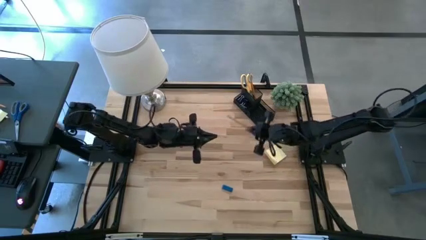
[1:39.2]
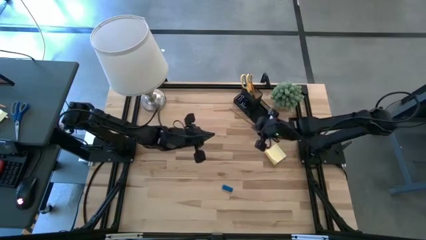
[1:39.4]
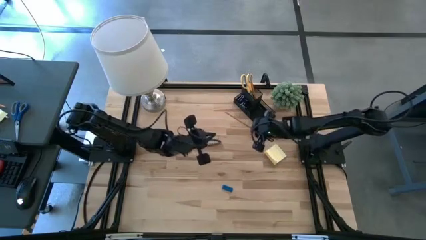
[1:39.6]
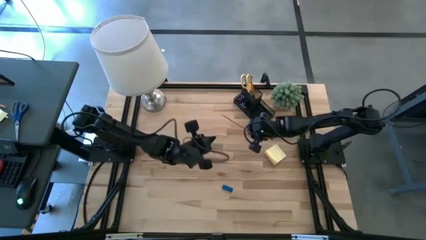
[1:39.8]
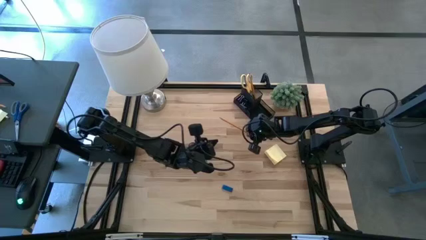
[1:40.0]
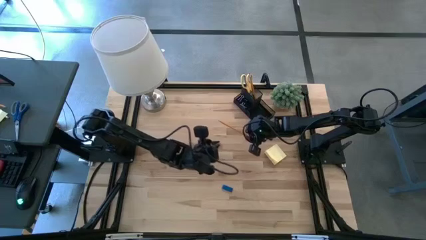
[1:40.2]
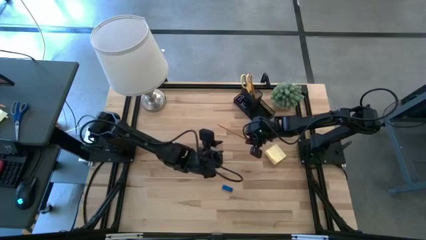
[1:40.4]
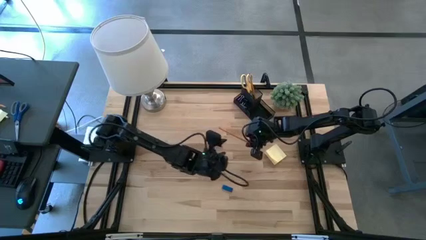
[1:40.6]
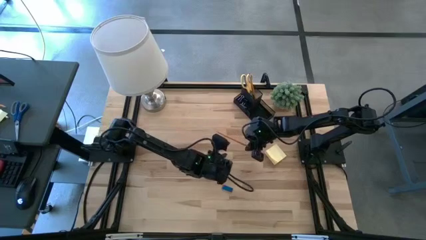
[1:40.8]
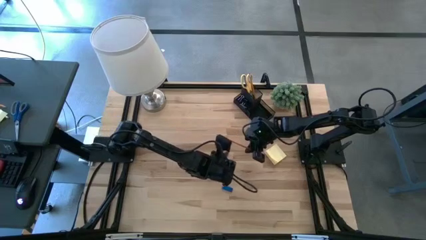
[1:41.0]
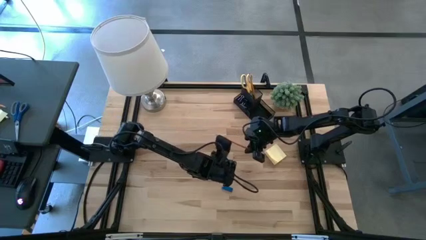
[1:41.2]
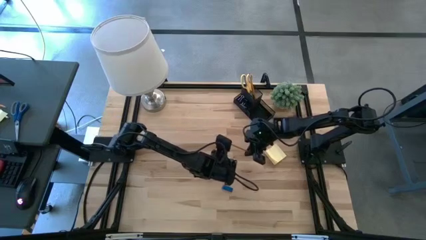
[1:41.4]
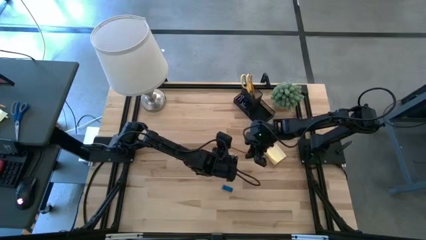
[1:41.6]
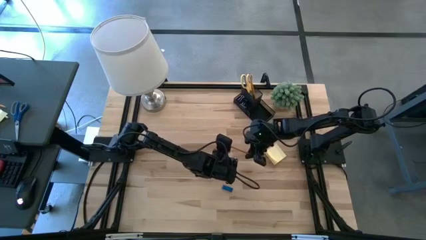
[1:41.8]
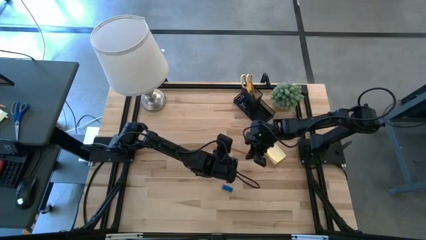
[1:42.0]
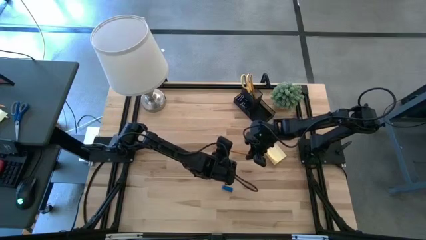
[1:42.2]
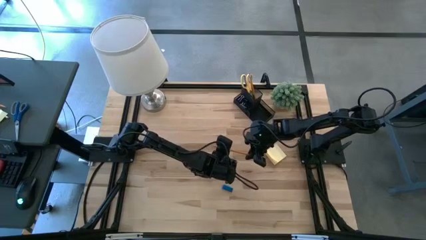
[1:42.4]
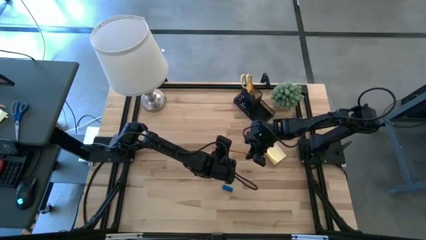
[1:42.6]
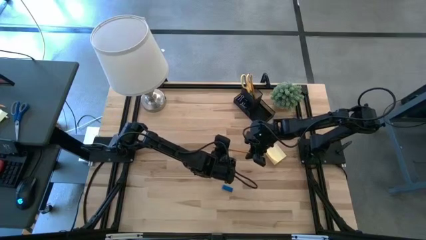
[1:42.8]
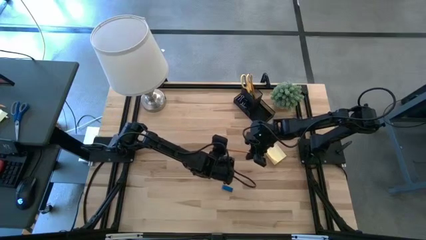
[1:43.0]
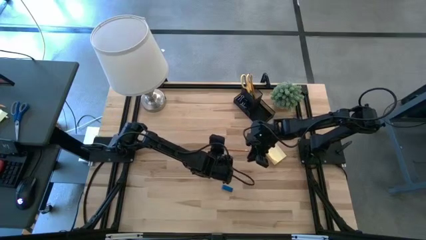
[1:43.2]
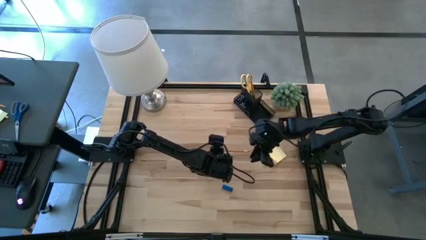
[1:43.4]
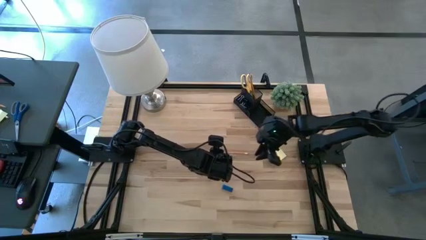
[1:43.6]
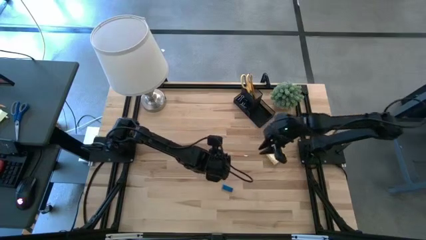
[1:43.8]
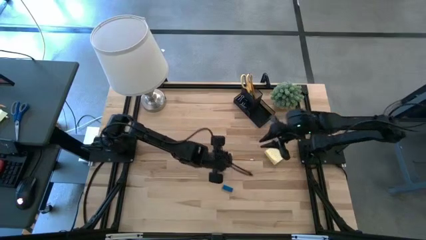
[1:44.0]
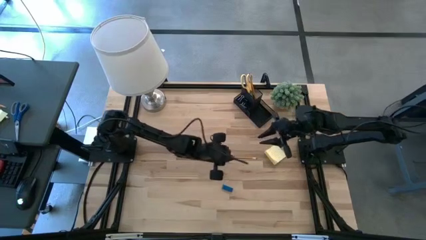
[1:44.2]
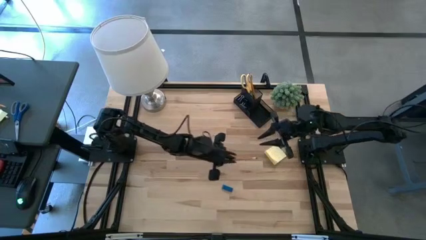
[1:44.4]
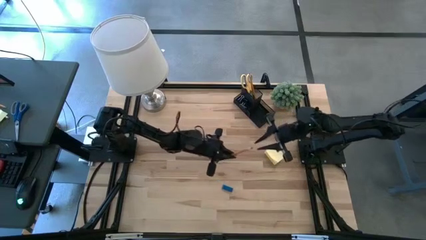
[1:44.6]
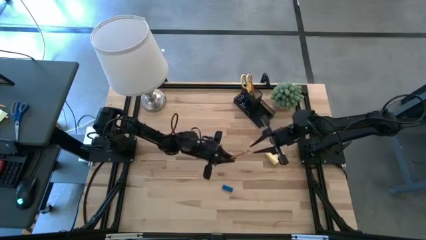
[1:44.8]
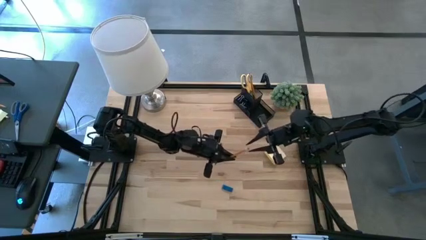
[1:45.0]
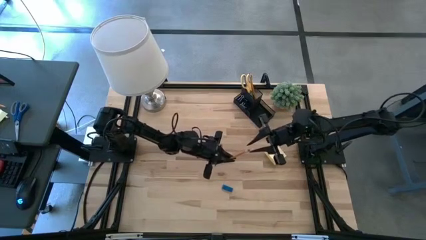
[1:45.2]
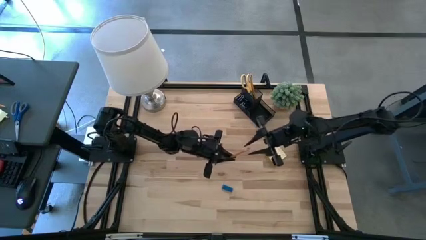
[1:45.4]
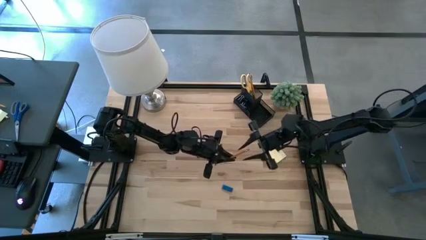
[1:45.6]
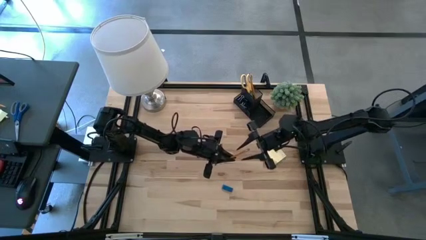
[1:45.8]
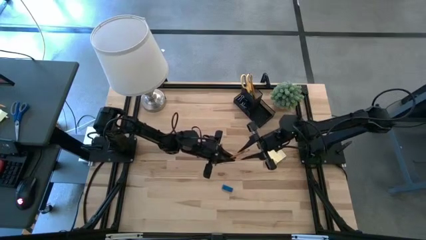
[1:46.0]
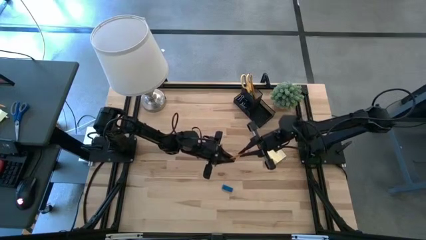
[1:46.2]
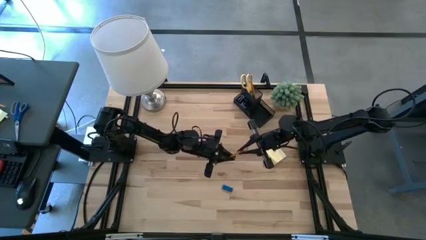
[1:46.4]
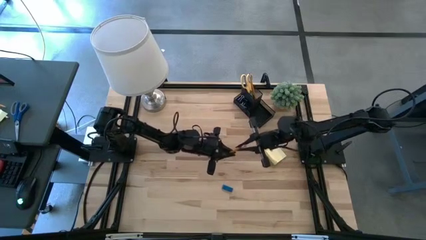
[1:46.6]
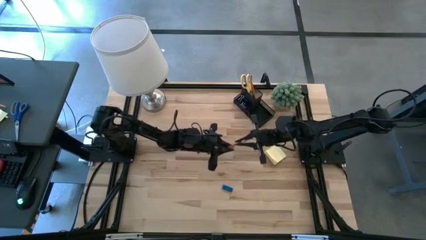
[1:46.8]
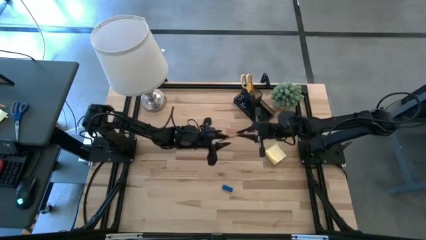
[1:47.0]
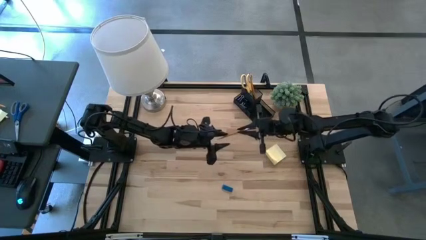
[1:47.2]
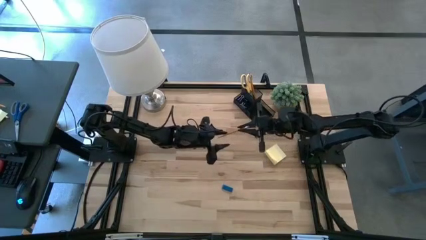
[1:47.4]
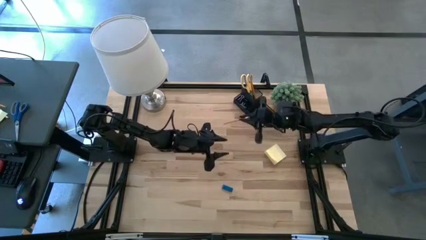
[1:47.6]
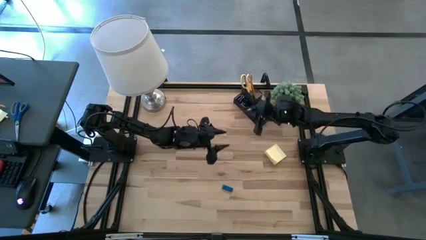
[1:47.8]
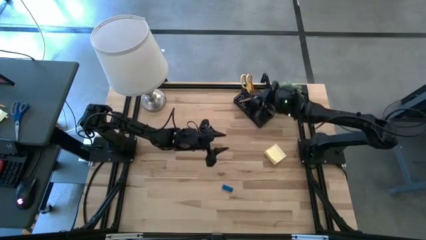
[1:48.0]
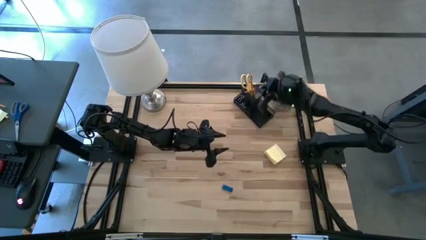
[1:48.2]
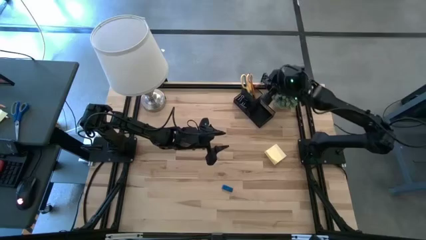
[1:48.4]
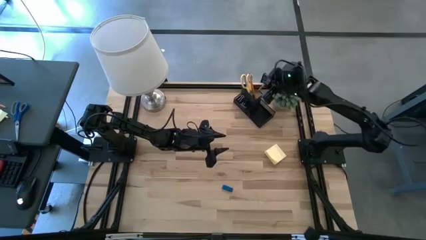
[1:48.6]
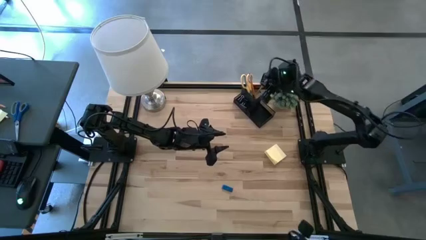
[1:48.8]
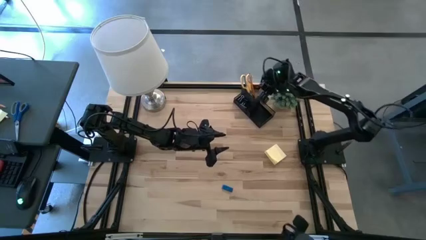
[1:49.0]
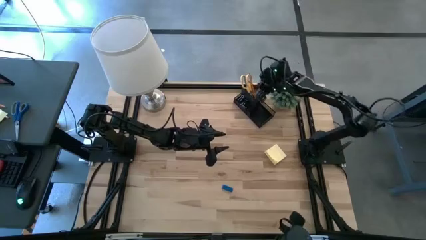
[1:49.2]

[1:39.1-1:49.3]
Task: Pick and place office supplies into organizer
Put the orange pencil into the desk organizer
